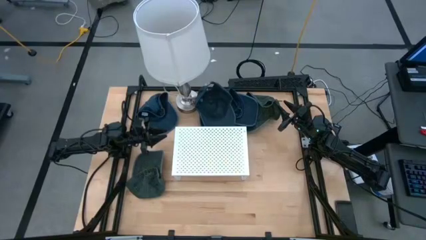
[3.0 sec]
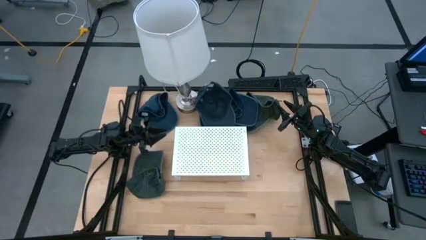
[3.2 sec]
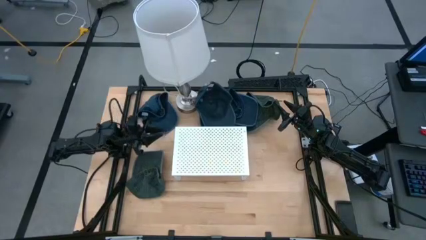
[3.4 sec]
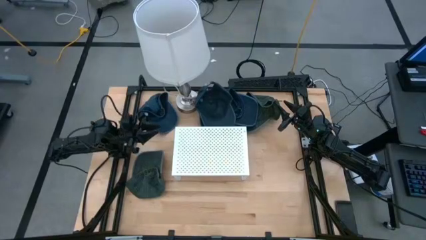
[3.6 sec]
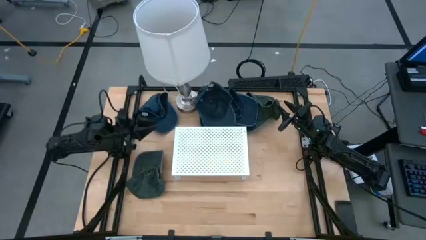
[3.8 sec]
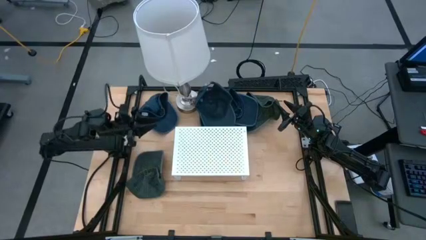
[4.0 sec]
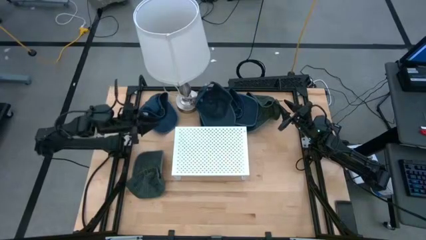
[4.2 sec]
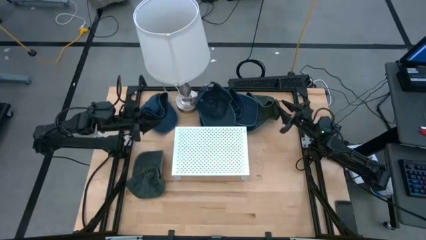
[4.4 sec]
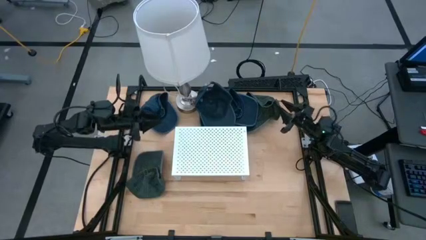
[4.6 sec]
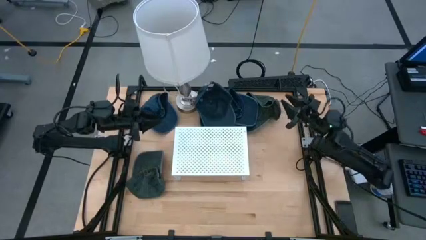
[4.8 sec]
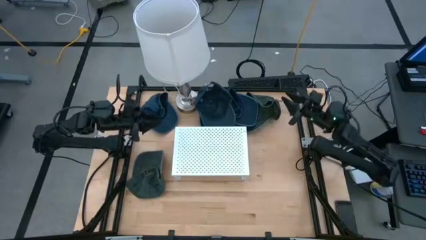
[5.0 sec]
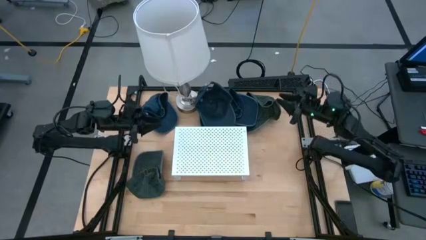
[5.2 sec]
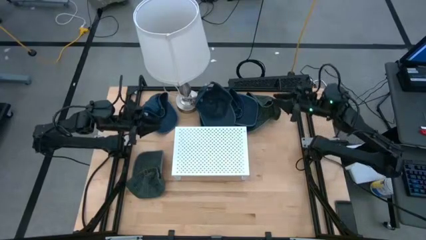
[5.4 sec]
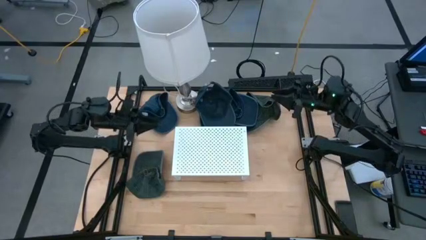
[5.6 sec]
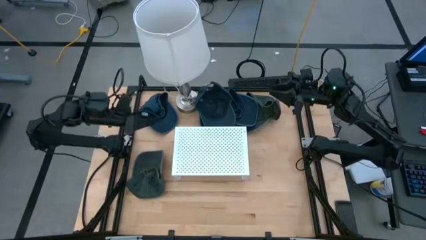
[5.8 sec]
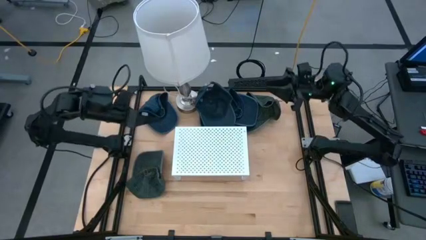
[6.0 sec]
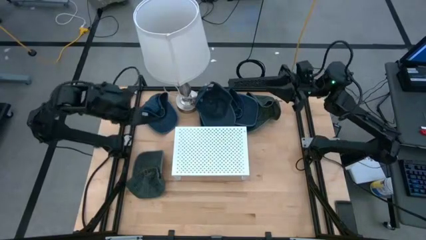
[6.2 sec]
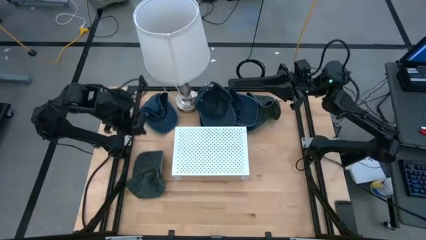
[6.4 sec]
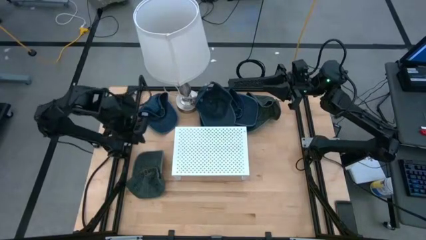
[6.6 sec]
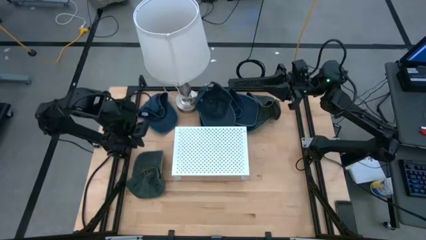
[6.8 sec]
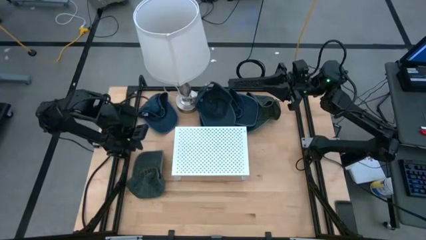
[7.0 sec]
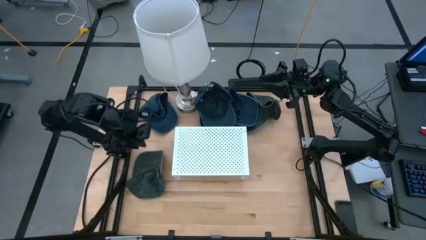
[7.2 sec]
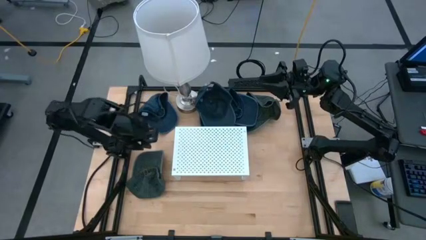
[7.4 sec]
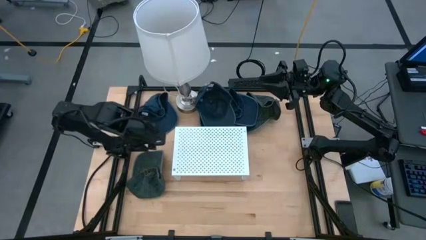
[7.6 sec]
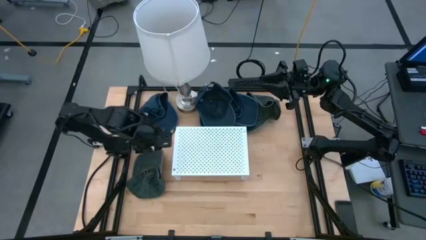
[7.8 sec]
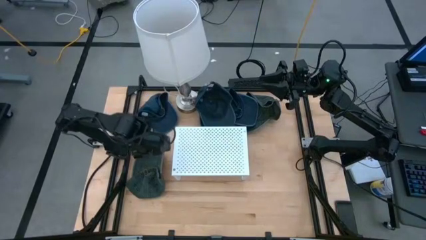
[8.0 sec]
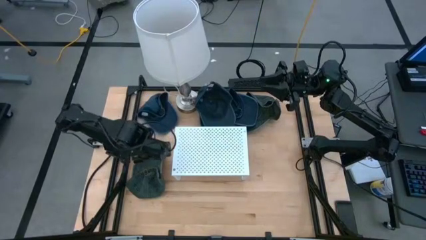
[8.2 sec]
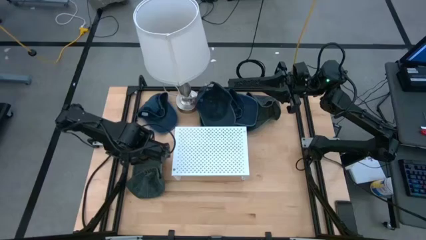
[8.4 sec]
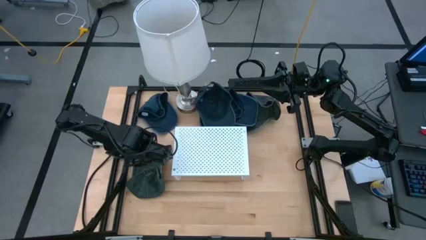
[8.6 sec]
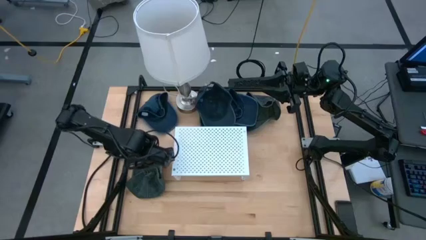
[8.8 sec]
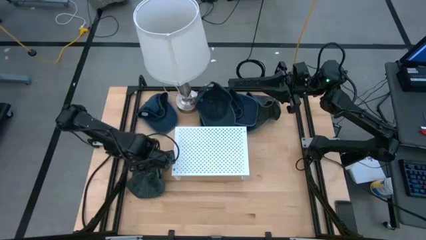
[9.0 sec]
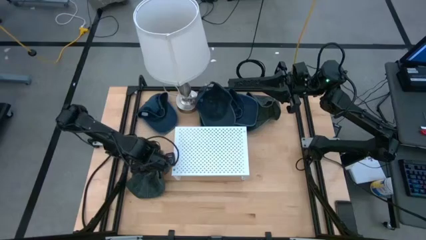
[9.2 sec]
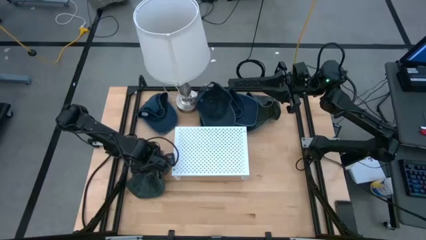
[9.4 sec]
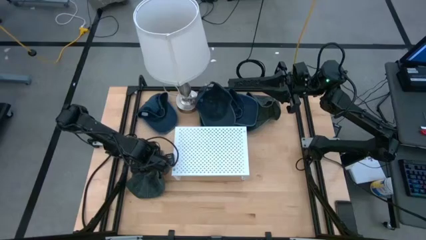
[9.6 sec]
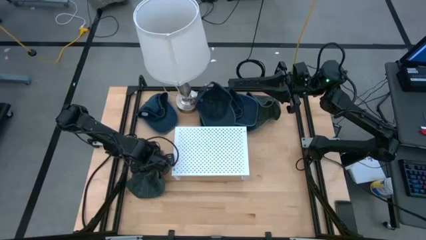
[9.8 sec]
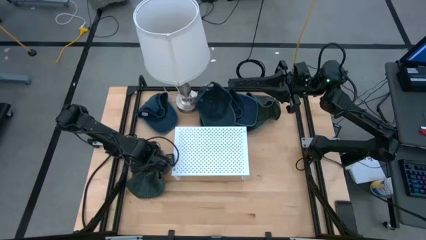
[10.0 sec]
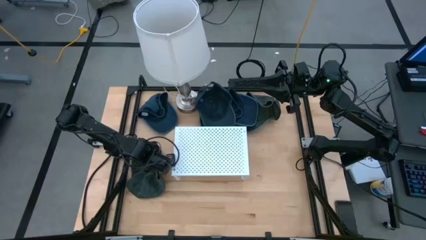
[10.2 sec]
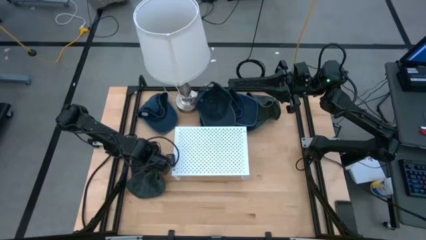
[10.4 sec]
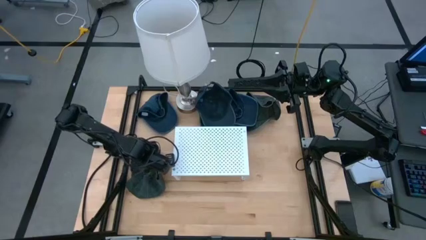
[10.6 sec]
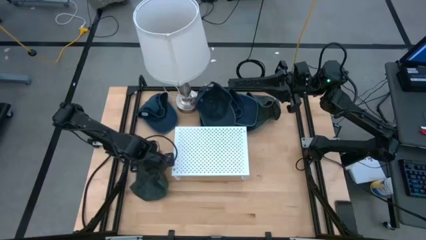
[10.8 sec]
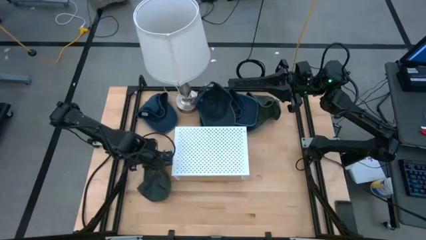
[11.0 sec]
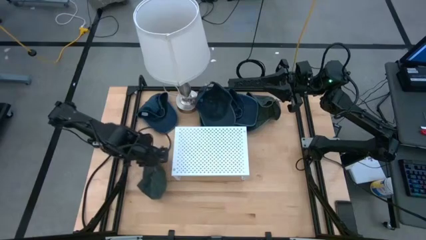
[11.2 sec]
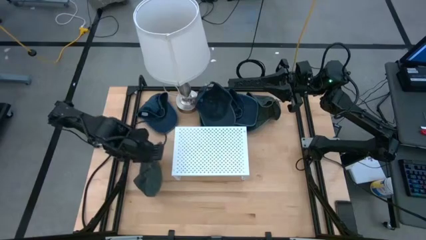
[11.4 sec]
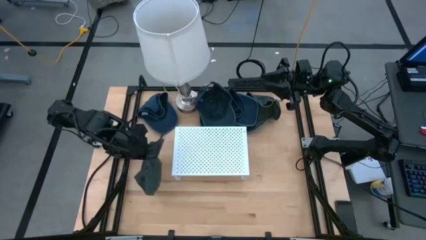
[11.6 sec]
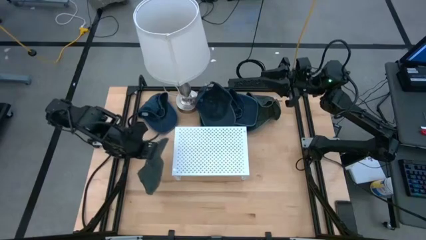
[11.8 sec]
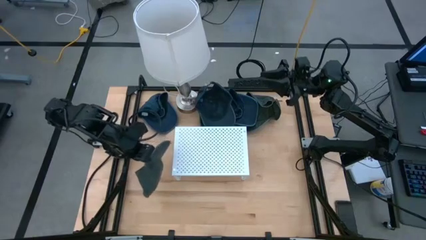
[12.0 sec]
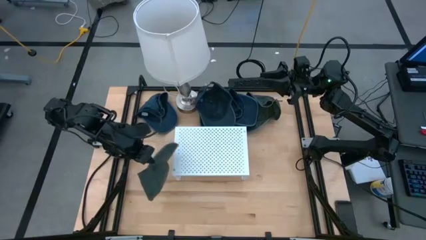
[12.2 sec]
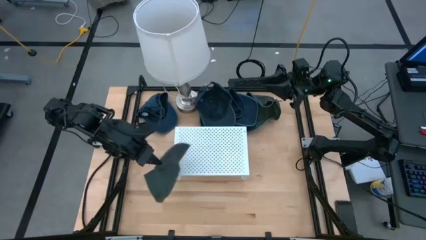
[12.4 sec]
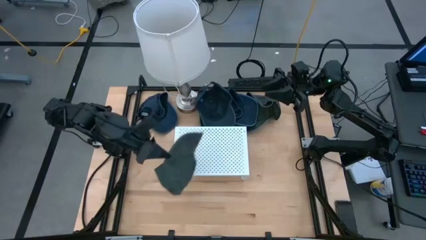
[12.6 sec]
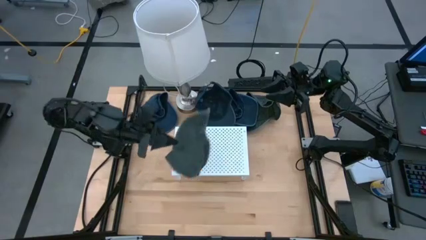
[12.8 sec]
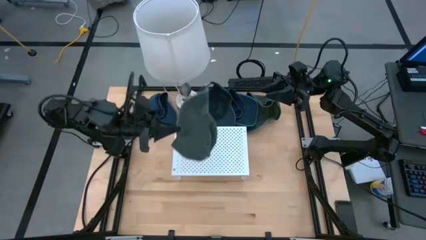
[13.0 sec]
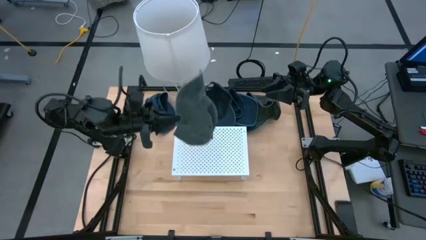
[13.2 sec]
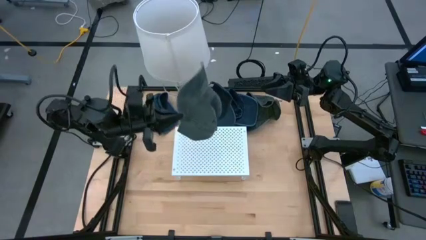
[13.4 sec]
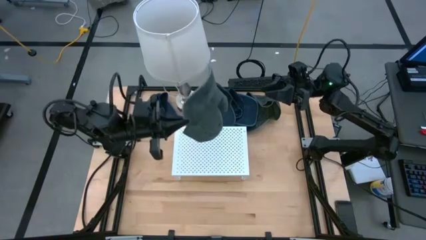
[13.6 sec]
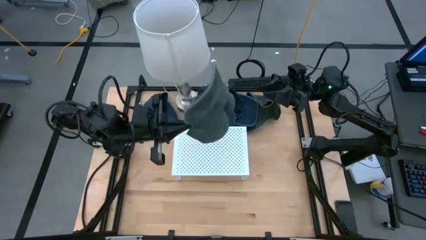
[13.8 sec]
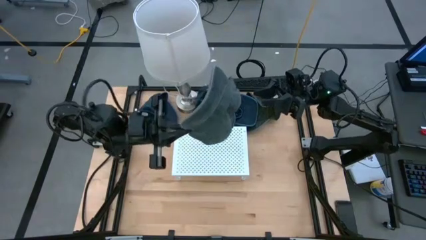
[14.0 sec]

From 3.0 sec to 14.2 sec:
Task: Pick & Place hat
Put the bottom left black cap on the left side of the shelf
